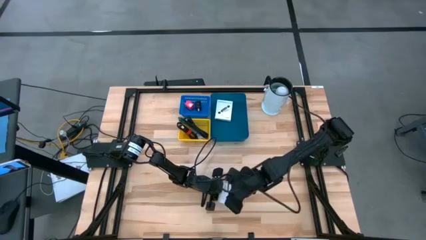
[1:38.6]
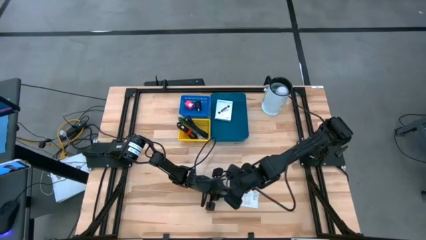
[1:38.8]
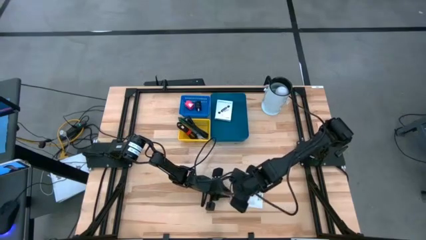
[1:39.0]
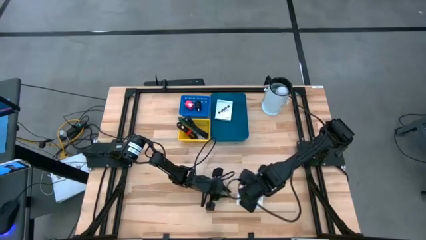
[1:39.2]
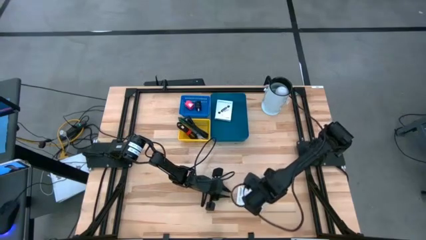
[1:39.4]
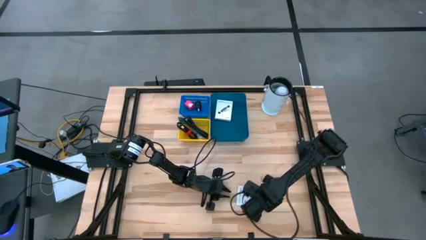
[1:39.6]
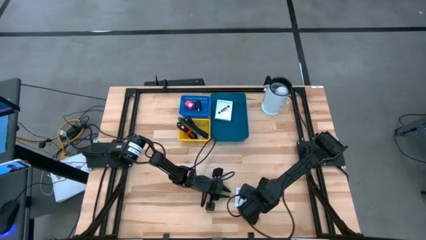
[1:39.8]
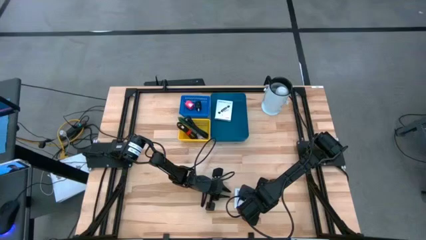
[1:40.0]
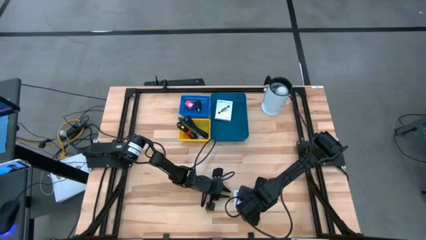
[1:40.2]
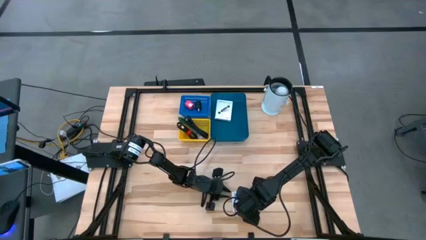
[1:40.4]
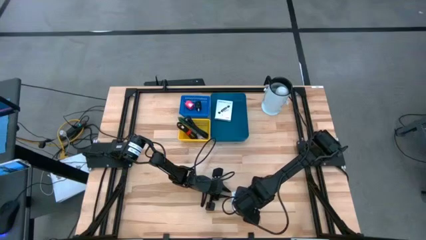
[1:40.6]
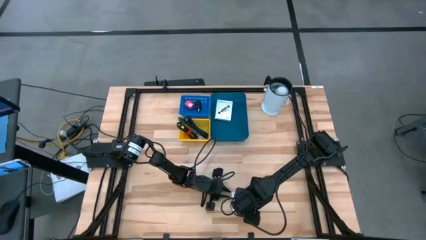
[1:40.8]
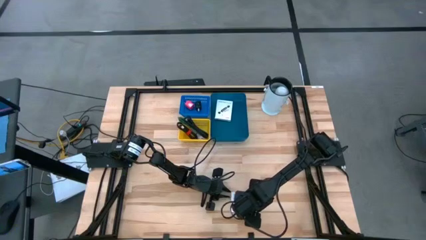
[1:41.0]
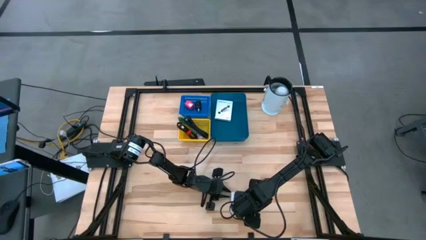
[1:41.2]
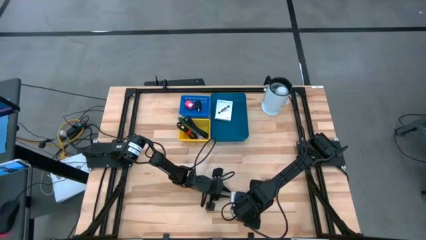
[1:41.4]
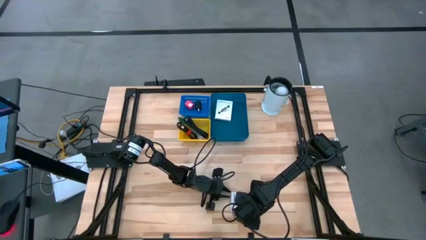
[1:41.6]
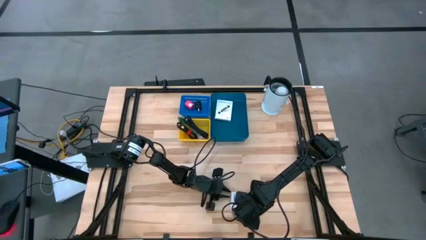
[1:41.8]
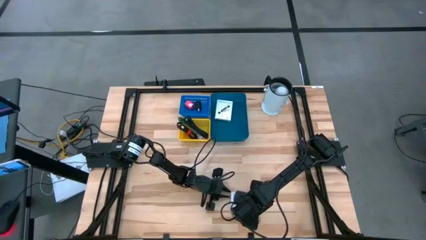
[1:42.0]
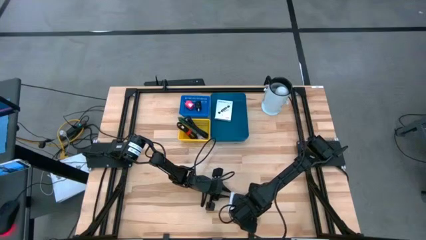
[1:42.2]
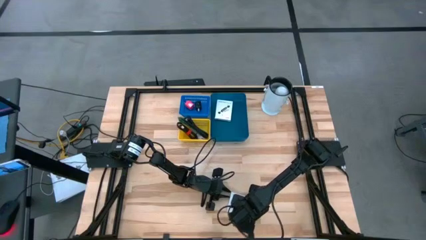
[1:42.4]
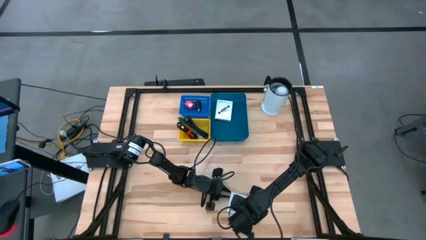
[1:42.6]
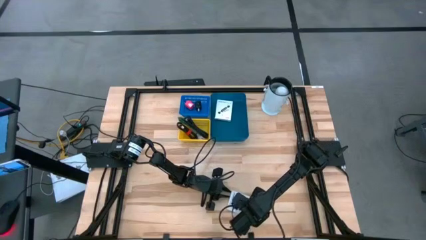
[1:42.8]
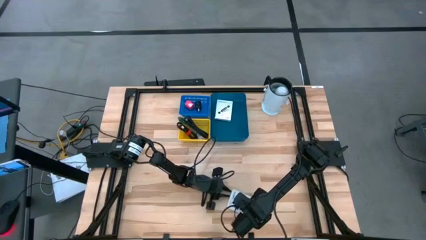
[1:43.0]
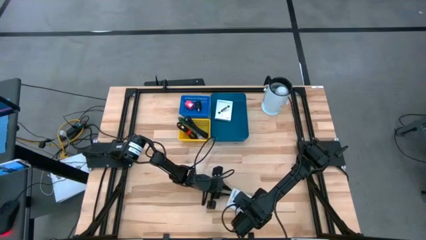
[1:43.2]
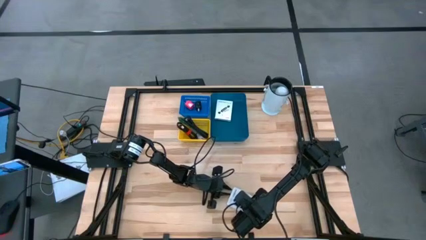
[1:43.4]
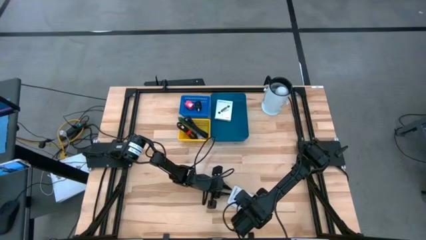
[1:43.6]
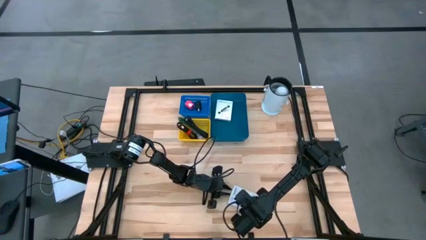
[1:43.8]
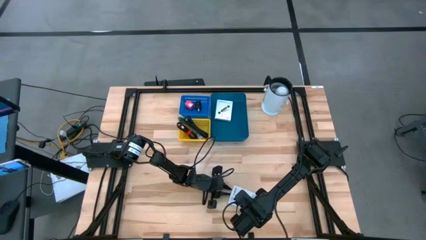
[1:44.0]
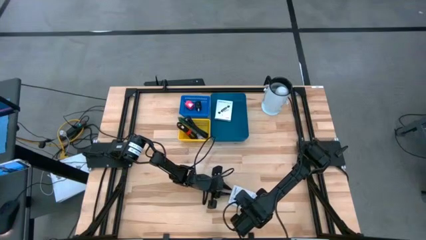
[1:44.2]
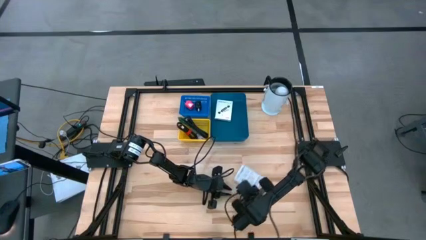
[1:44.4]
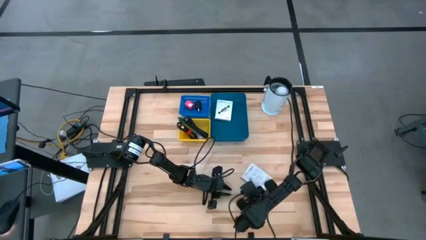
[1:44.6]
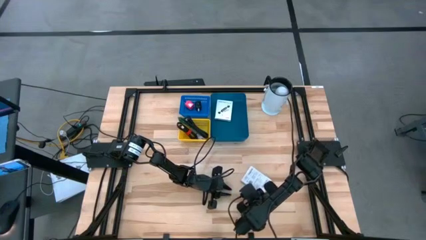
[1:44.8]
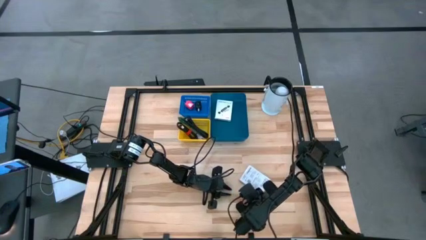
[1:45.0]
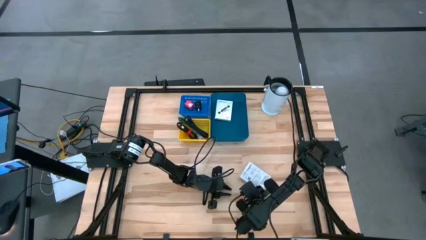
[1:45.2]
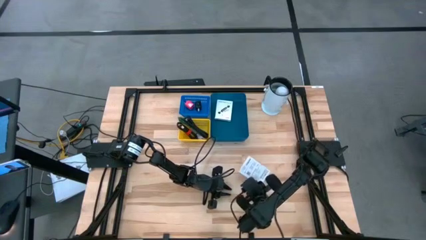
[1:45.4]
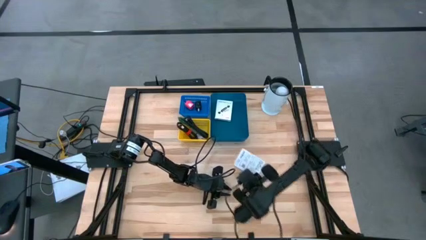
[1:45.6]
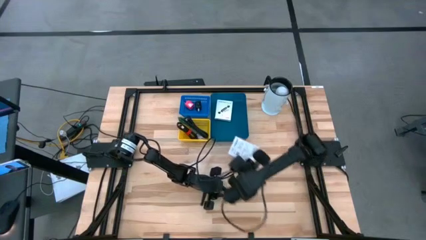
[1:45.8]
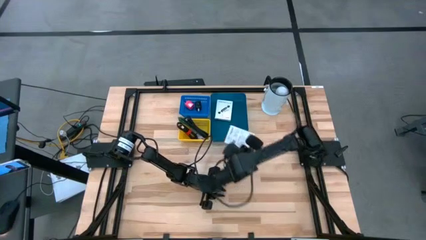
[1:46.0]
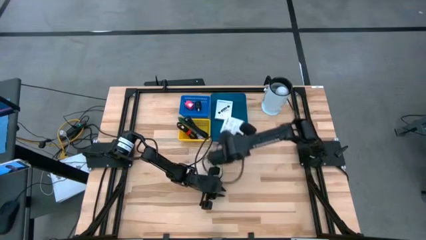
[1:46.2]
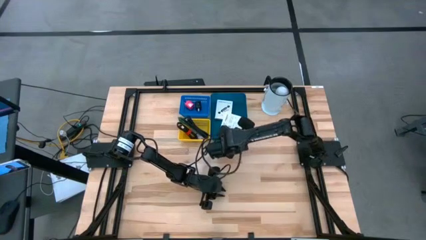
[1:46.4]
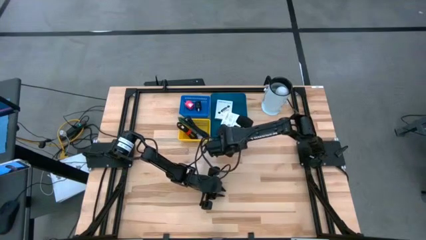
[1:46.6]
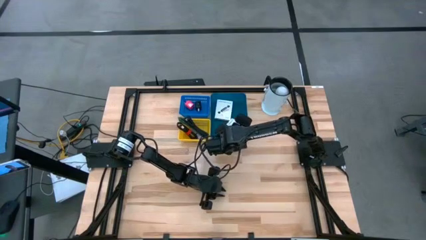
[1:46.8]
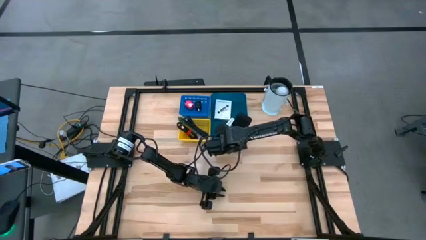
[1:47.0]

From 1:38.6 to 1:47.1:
Task: Pick and place items into bin
Put the card reader into the dark blue bin

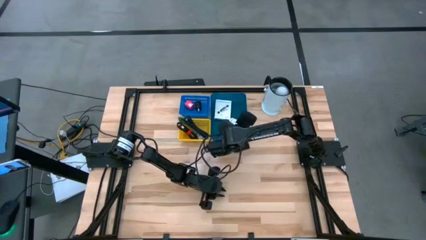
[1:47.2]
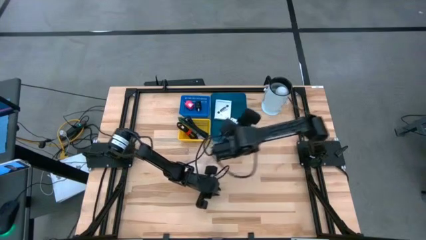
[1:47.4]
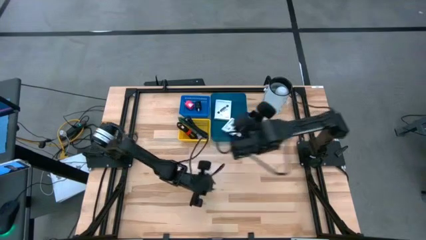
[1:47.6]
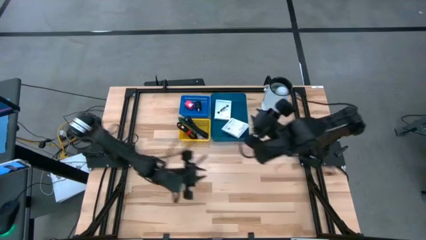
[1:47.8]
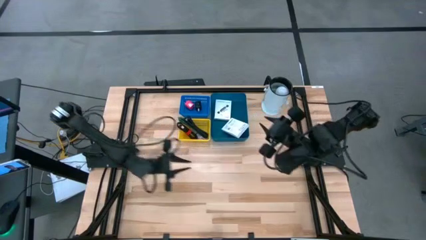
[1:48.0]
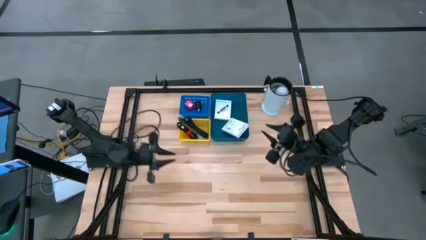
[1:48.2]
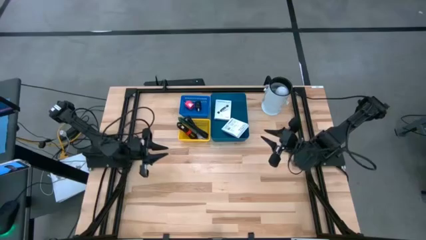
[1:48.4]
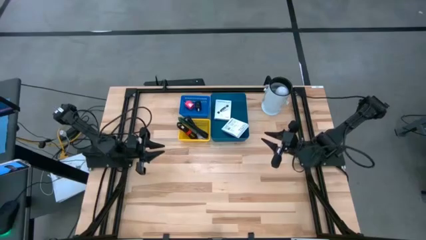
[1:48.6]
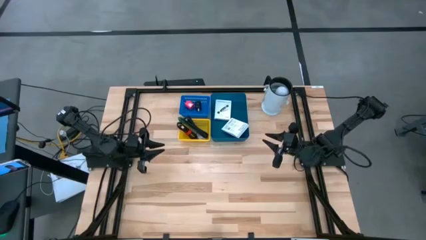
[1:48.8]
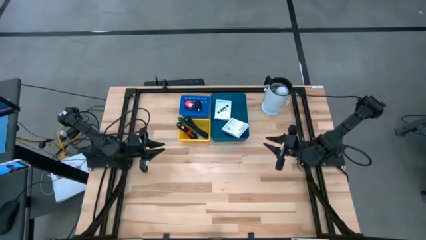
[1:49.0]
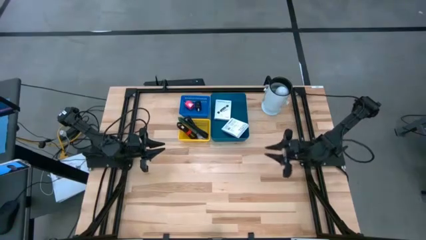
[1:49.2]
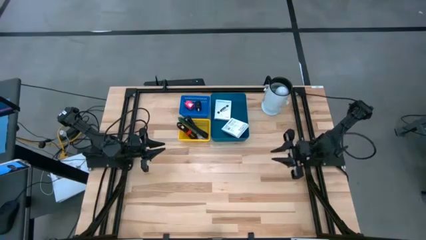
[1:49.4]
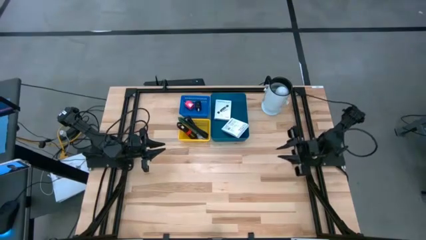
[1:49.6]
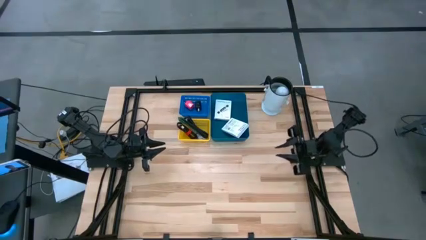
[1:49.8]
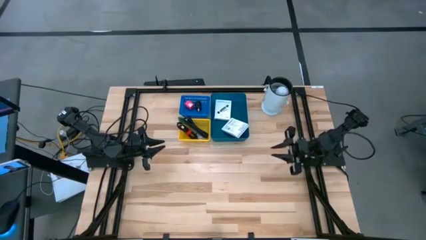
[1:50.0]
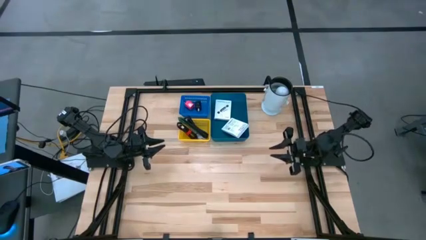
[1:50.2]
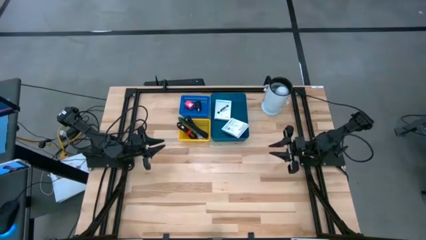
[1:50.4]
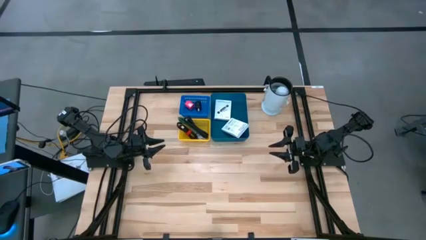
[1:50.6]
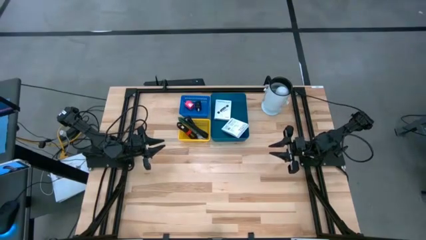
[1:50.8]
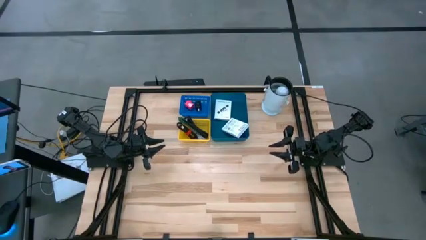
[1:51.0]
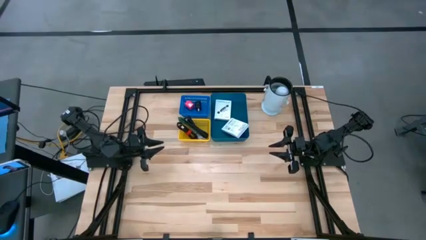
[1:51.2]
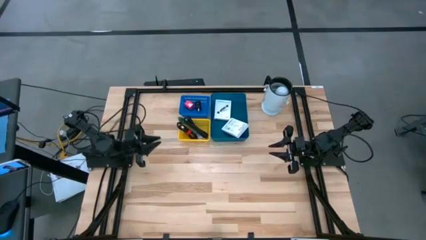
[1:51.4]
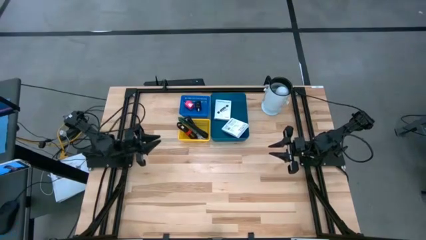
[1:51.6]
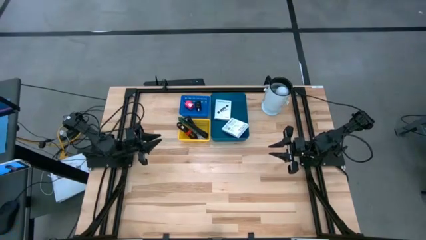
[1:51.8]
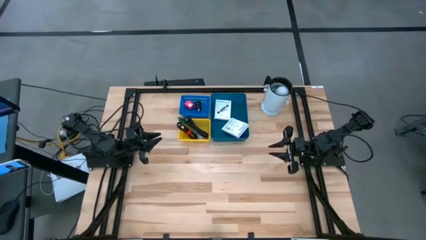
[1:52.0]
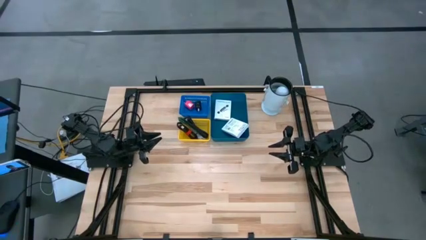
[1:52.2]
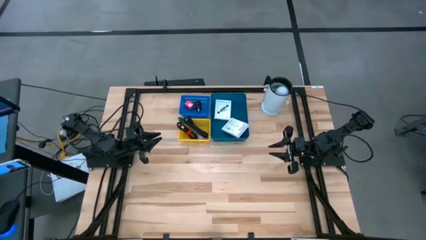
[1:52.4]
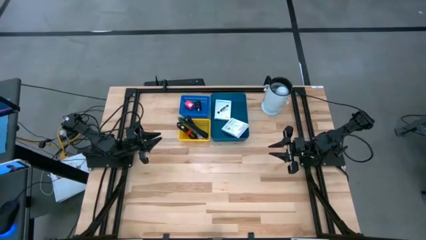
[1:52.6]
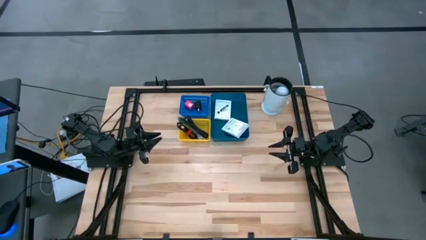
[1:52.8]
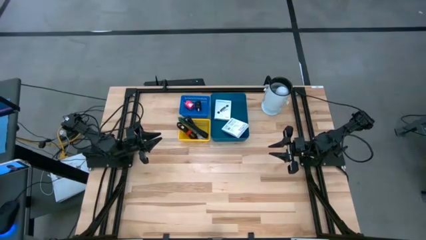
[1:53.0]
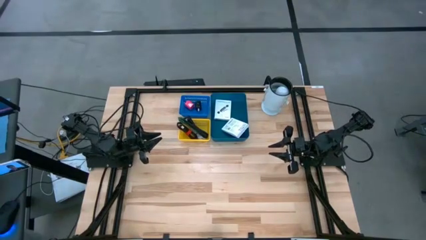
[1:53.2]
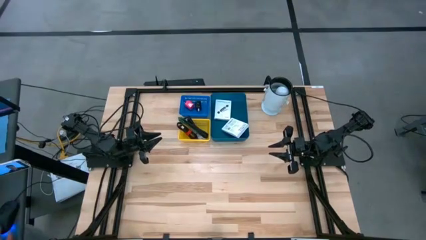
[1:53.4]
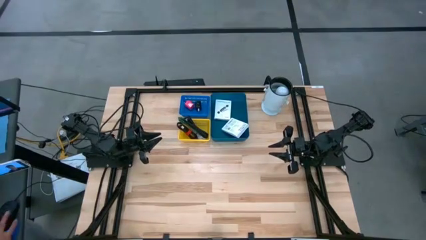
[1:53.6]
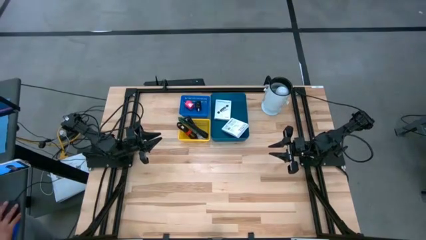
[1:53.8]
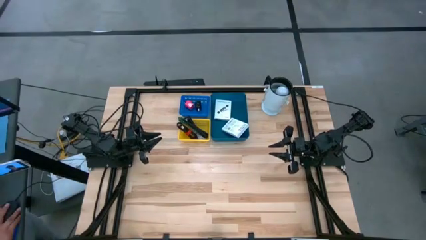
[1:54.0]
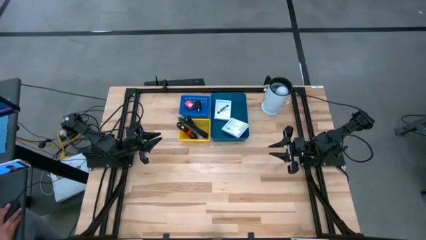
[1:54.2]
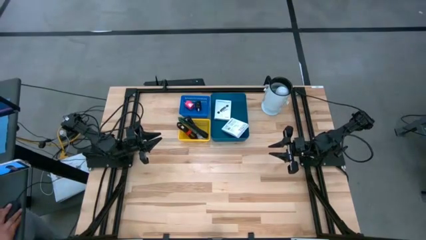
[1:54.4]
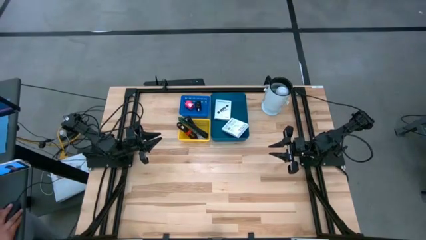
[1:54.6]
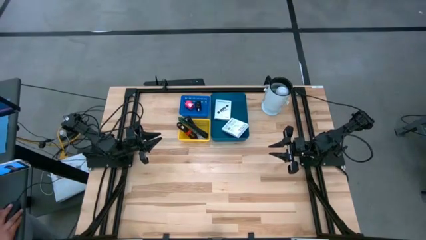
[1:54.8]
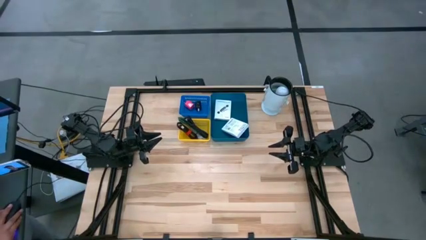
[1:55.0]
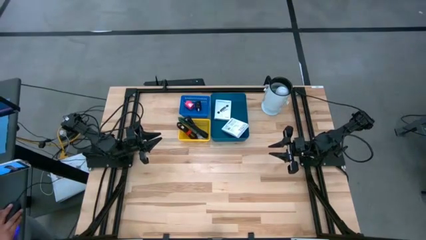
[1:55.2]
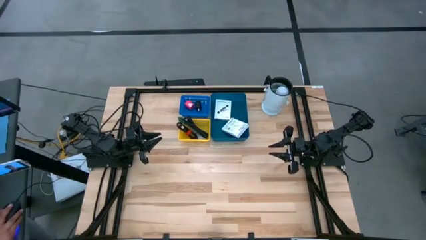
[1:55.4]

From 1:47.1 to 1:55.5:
Return to Home Position
